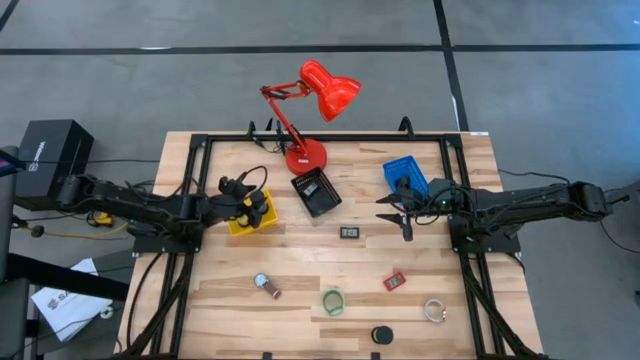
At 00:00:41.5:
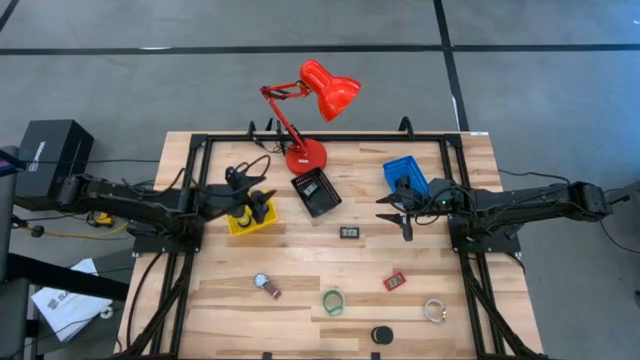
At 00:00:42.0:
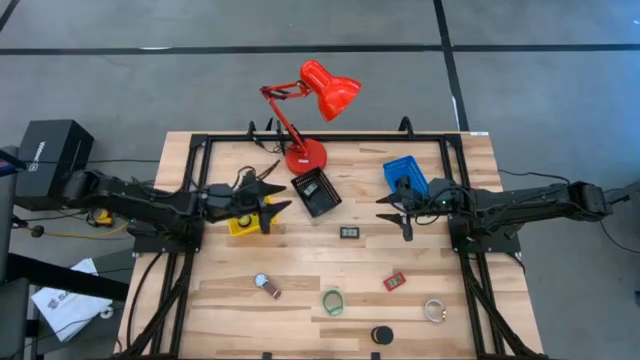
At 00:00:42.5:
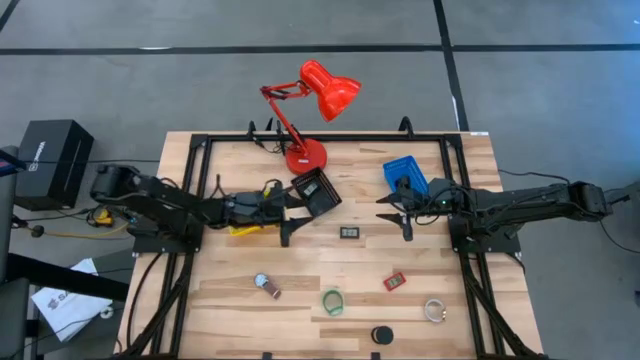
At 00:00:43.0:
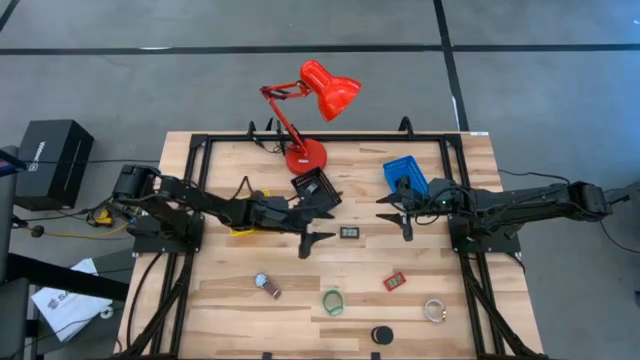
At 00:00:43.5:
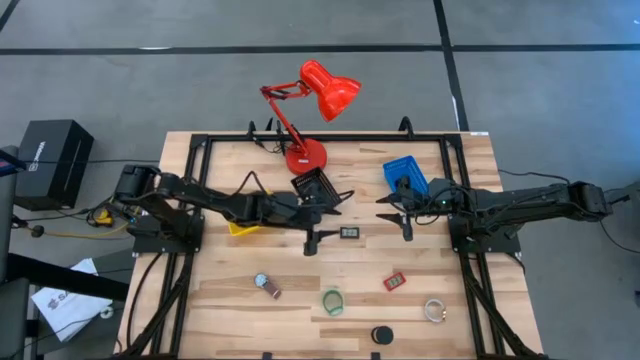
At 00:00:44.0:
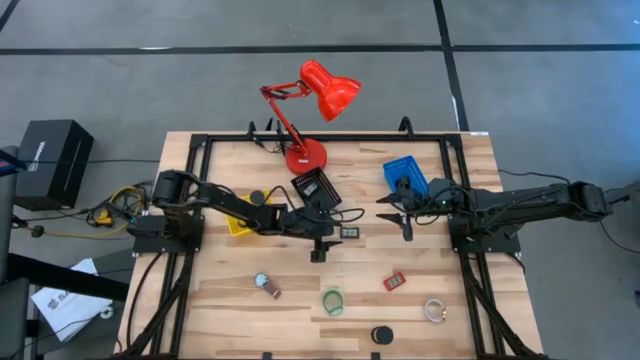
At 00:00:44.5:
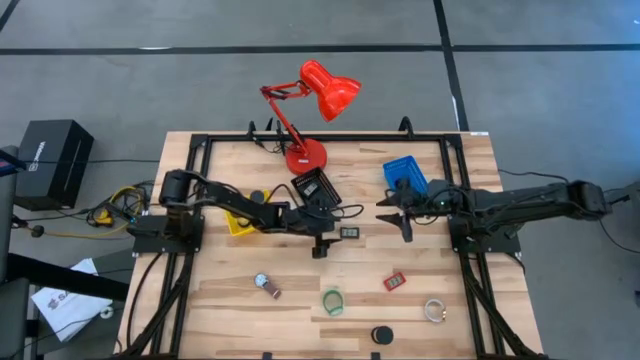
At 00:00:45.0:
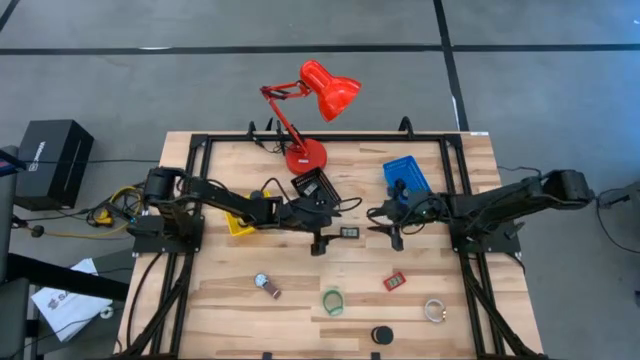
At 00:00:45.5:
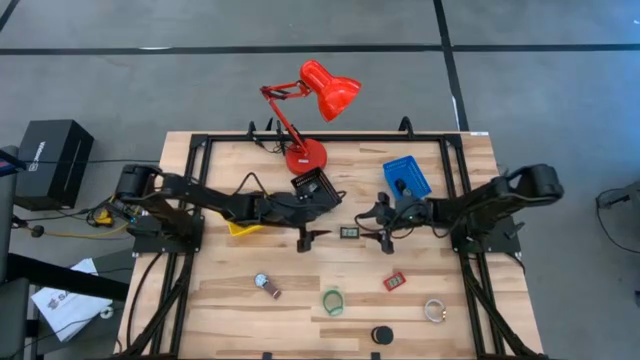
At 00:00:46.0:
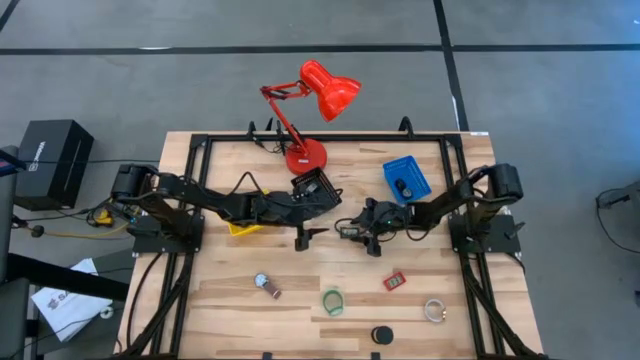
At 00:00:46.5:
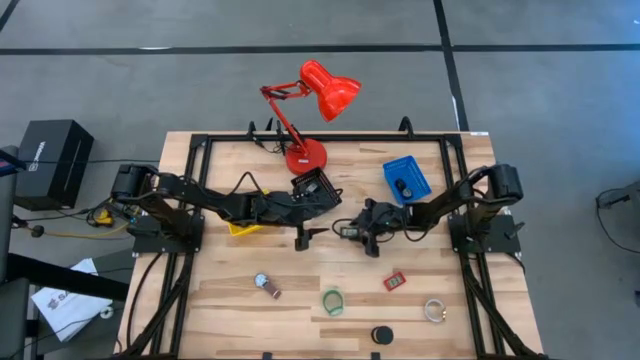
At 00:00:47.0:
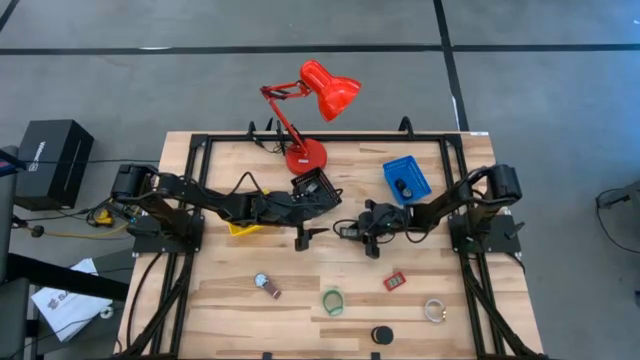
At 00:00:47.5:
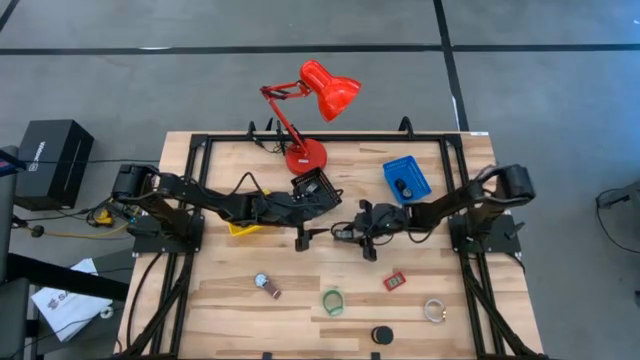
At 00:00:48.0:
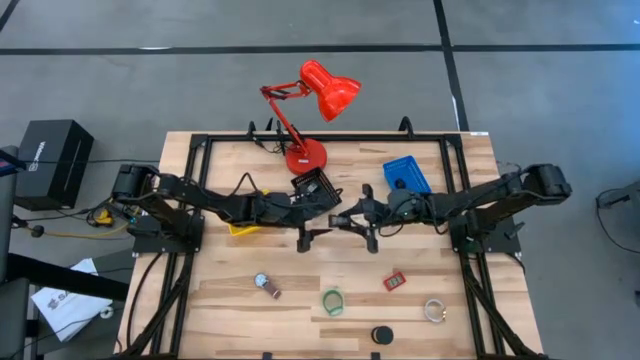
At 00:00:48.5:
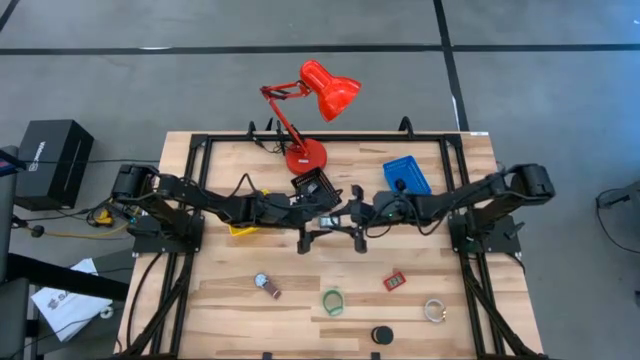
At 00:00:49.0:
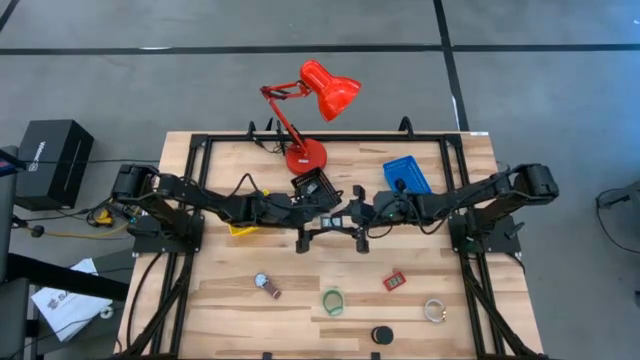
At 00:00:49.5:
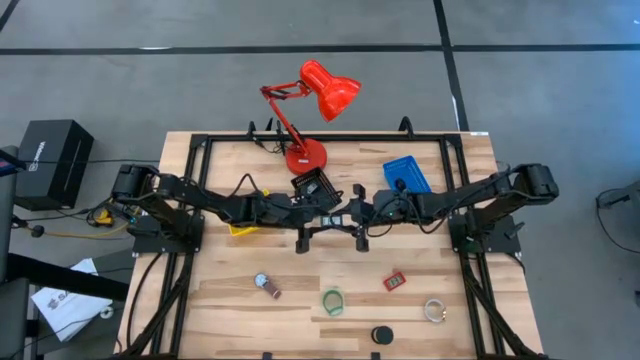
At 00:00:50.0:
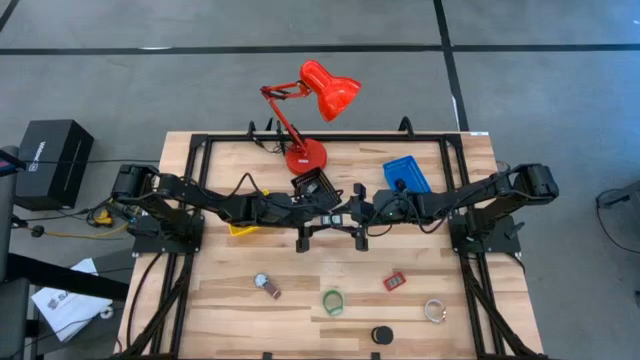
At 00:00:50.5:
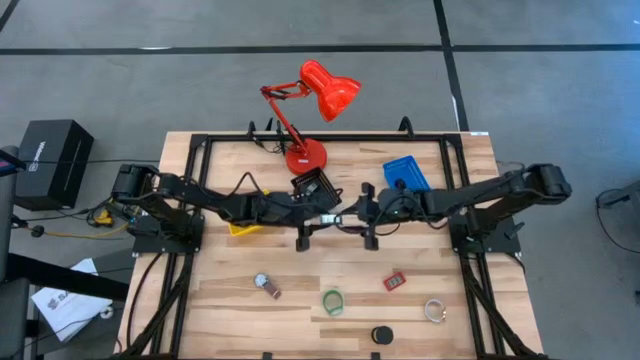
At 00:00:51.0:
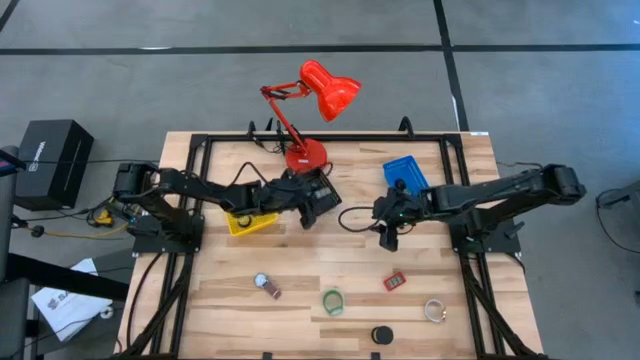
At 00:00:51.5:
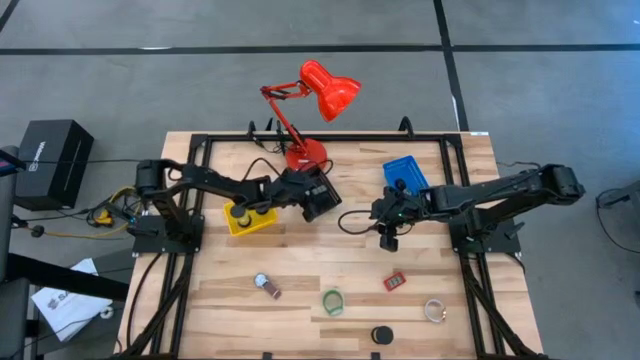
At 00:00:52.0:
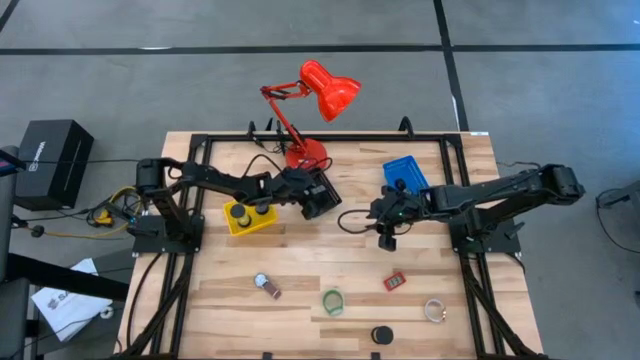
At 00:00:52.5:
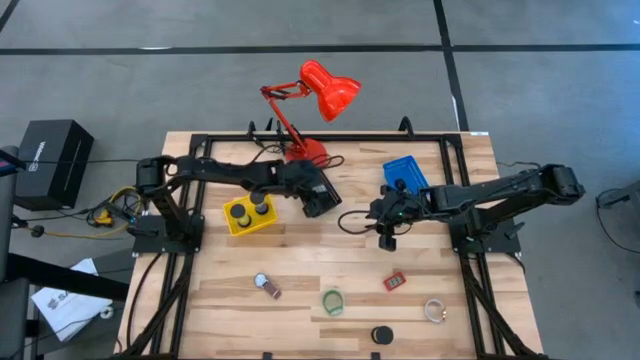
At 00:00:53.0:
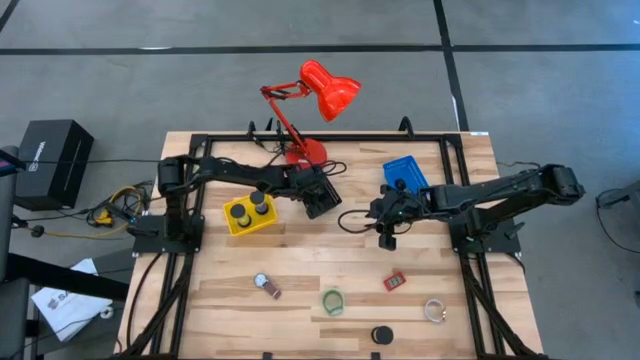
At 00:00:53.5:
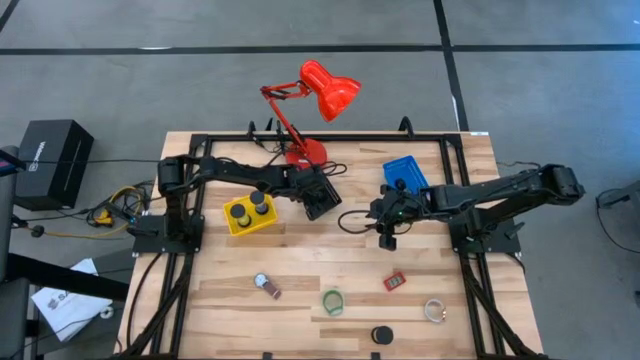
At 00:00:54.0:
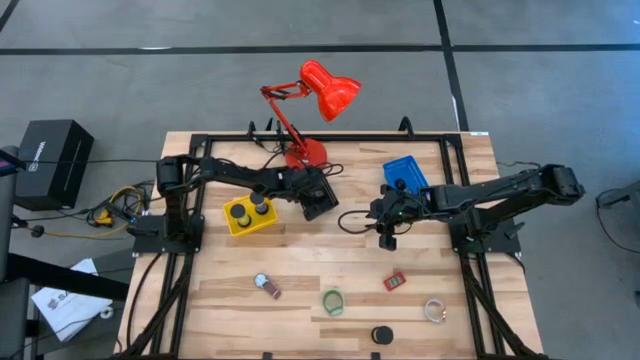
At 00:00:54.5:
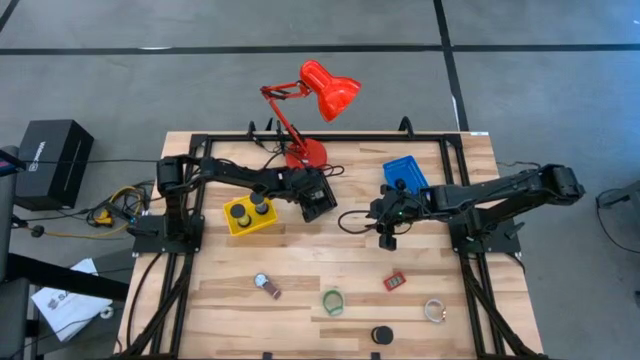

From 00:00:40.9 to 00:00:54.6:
Task: Pick & Place Office items
Put the black digital clock into the black bin

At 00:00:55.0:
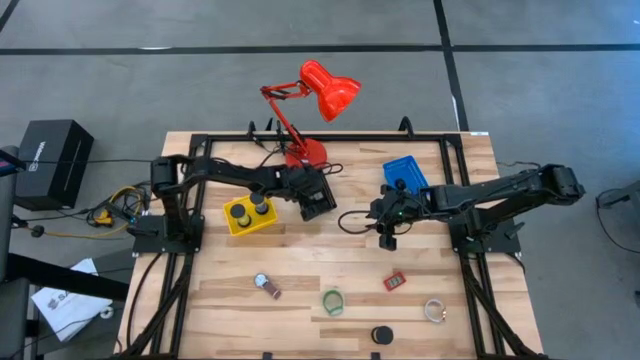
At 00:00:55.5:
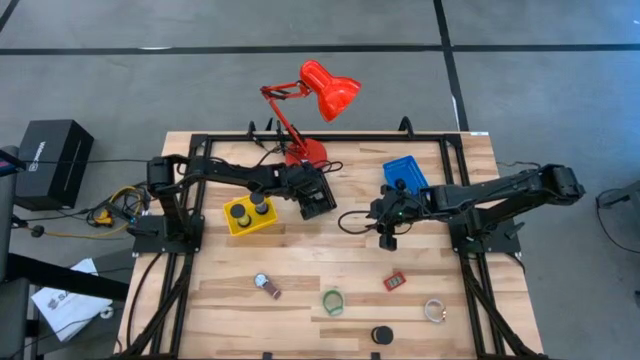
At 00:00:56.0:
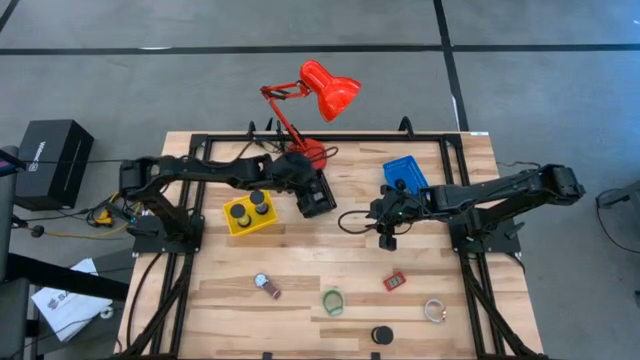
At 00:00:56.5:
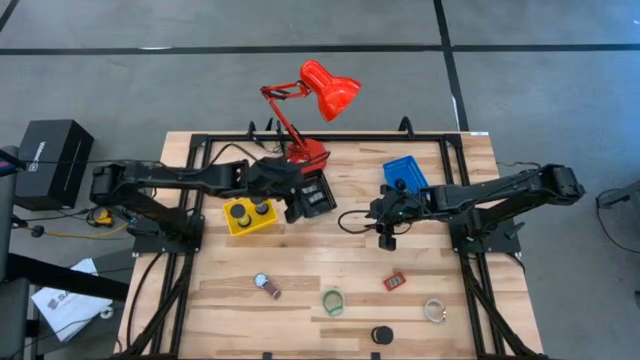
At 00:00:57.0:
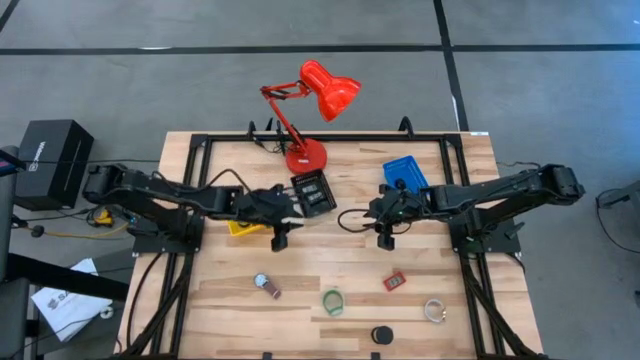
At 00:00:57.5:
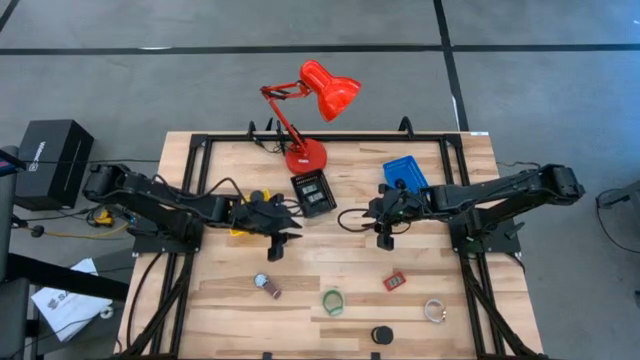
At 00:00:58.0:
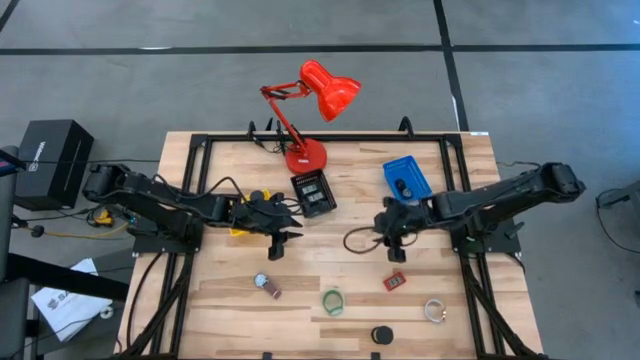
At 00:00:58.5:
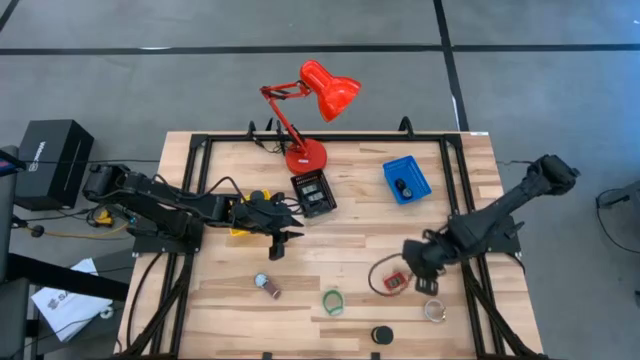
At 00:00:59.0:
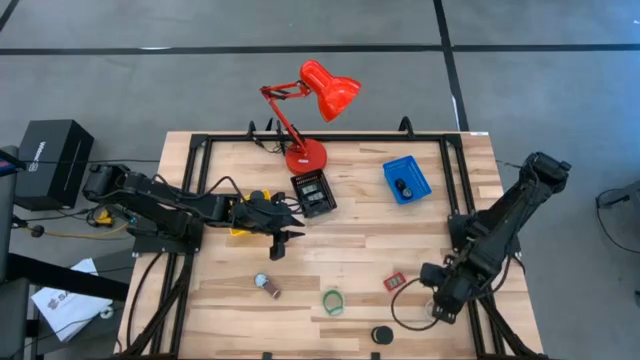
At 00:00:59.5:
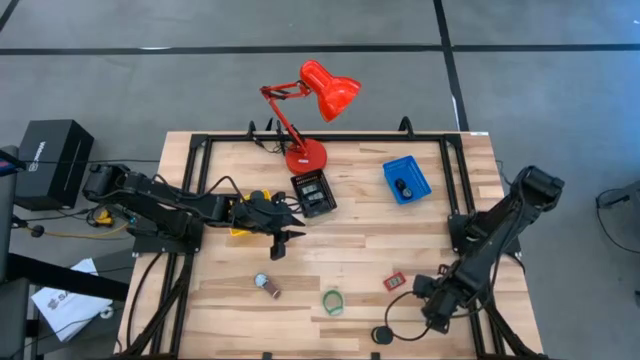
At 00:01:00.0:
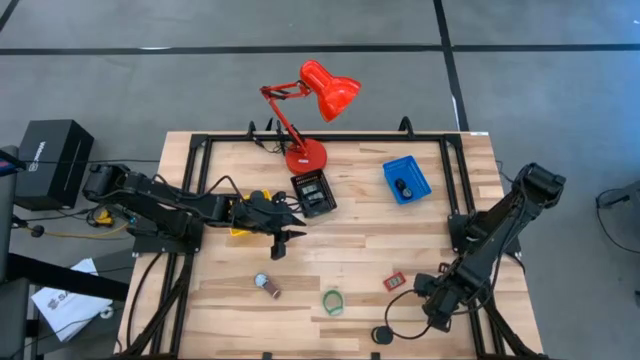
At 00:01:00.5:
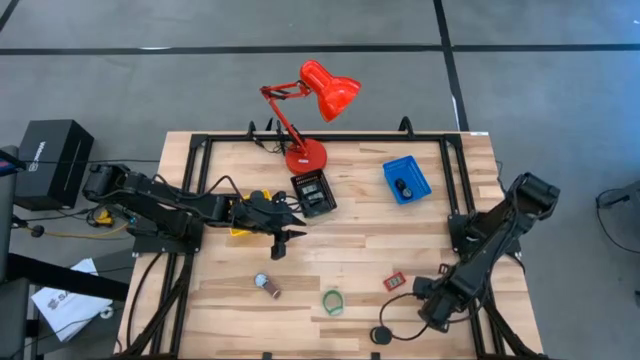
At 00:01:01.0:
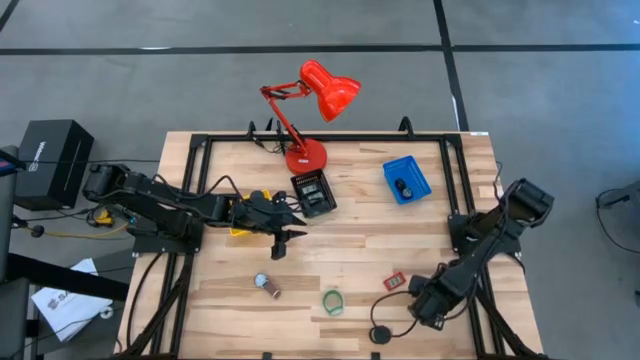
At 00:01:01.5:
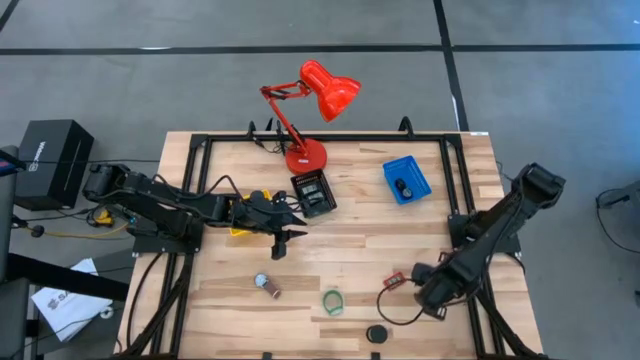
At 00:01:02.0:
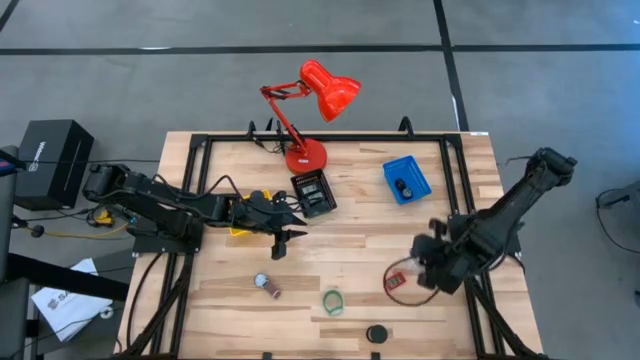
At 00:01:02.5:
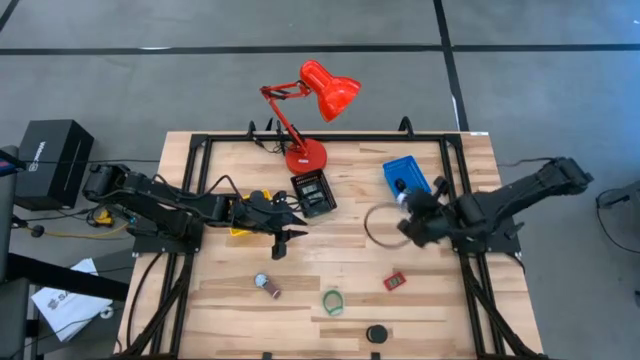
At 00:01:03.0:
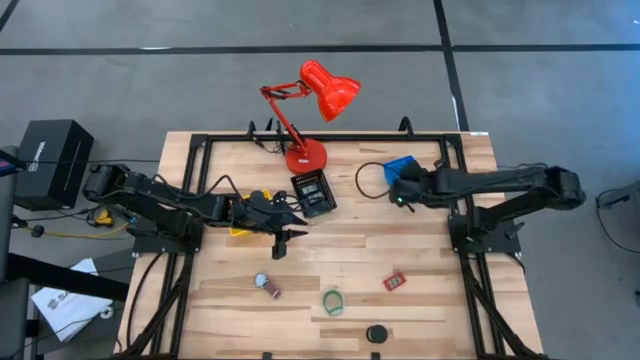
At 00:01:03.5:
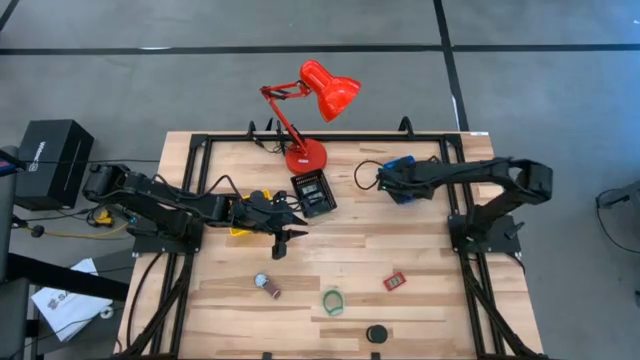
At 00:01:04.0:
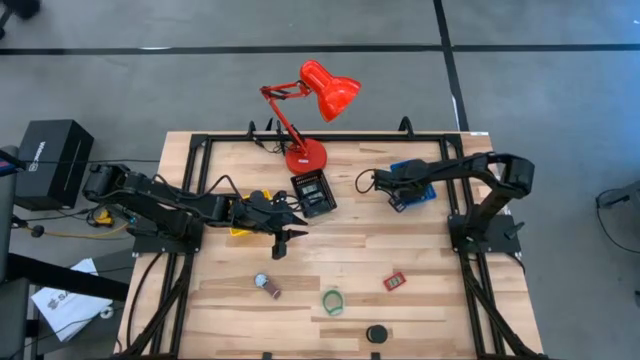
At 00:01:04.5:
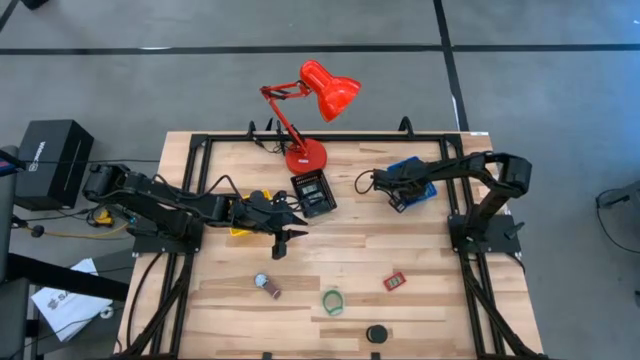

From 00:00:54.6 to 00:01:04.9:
Put the white wrist watch into the blue bin
